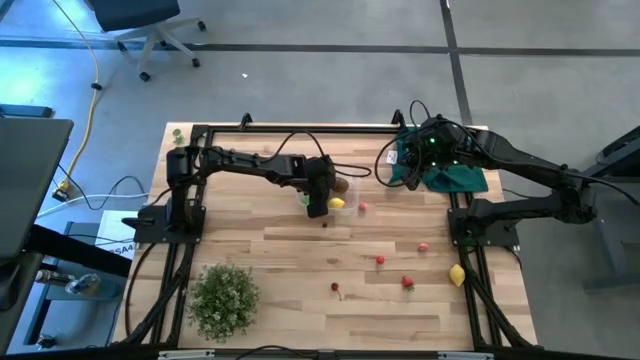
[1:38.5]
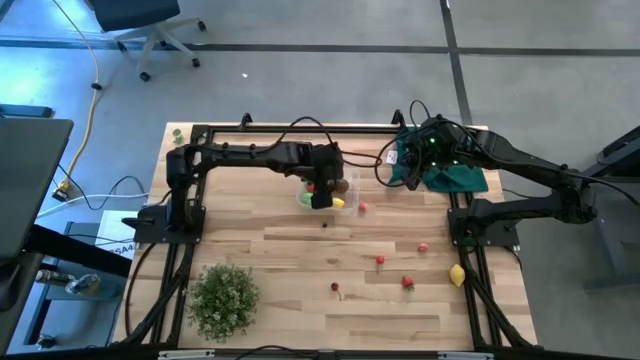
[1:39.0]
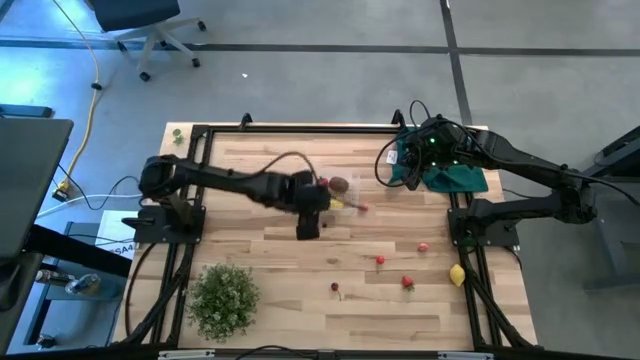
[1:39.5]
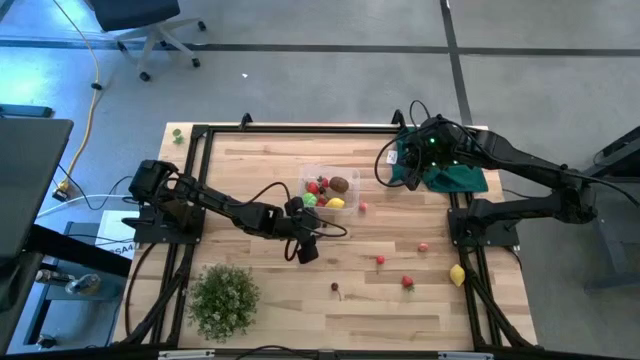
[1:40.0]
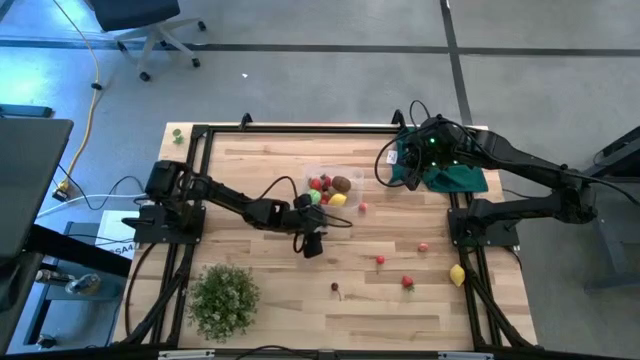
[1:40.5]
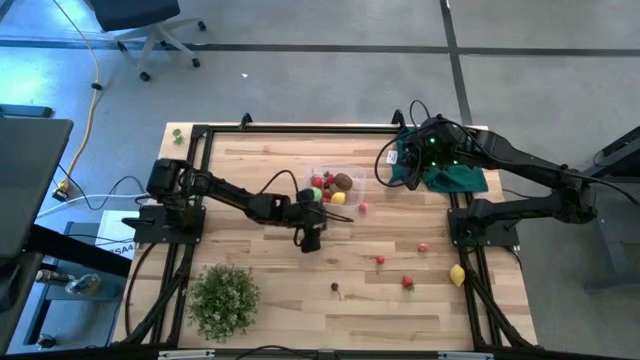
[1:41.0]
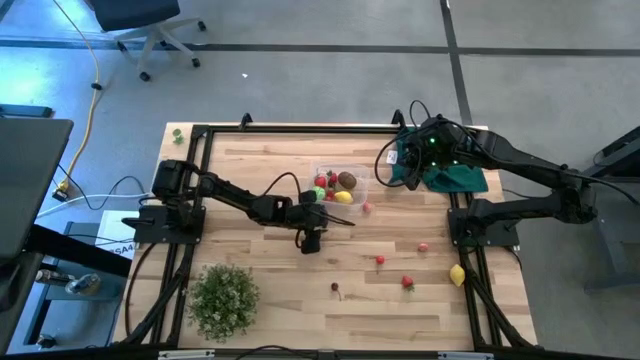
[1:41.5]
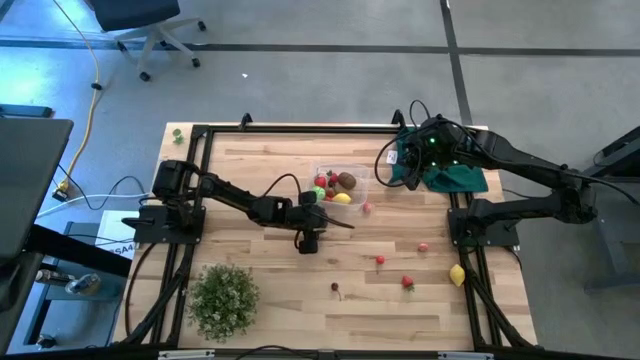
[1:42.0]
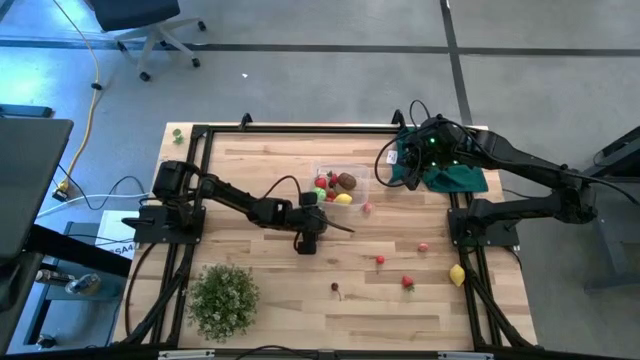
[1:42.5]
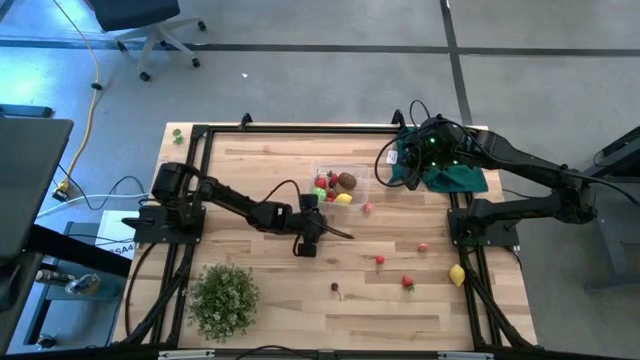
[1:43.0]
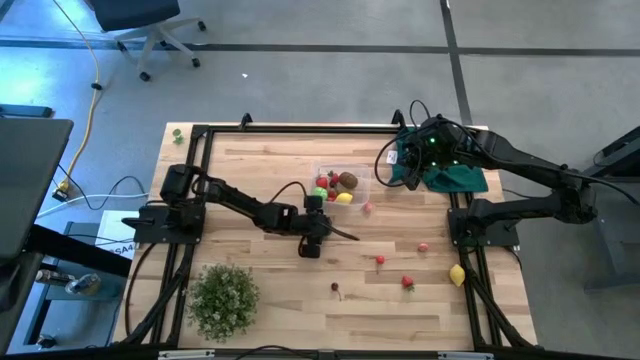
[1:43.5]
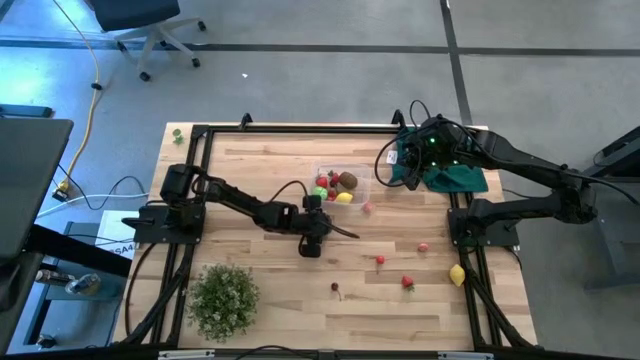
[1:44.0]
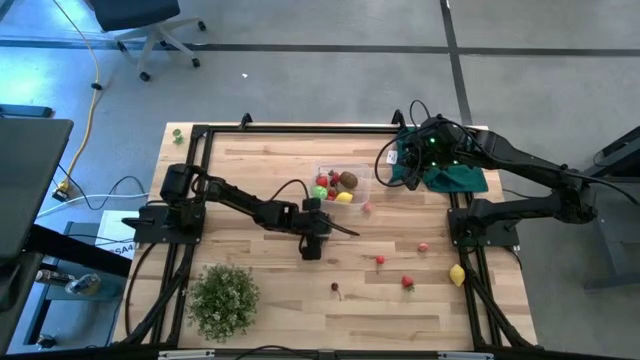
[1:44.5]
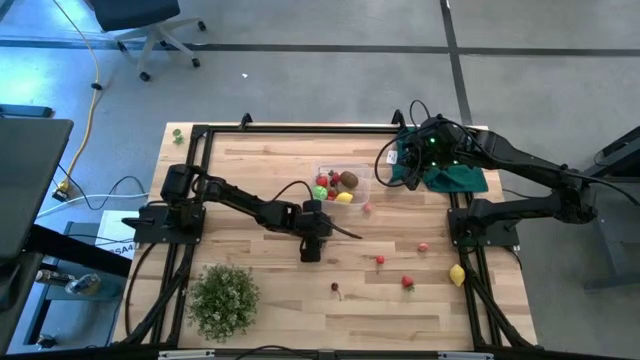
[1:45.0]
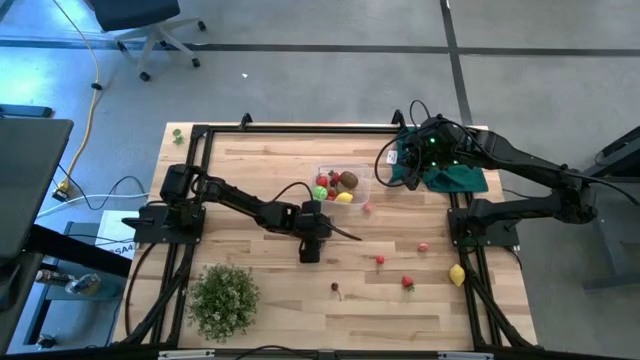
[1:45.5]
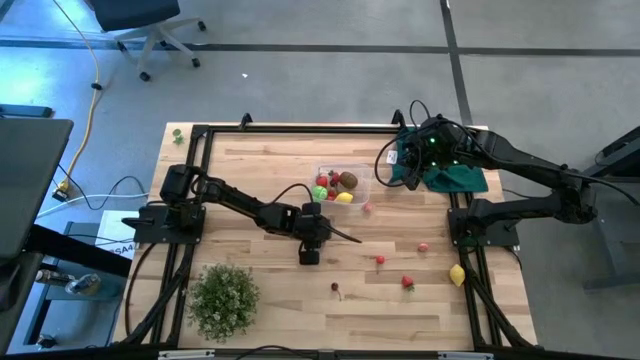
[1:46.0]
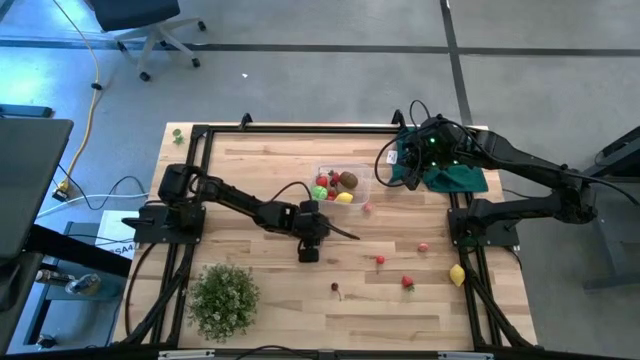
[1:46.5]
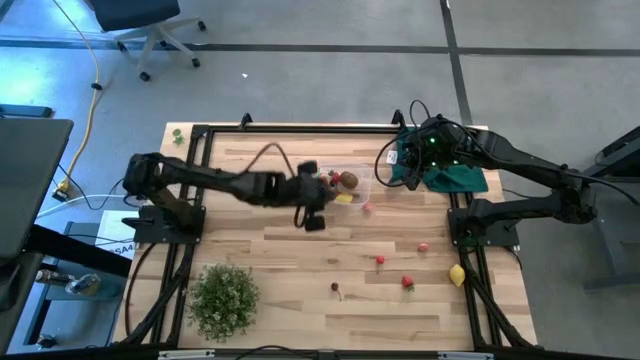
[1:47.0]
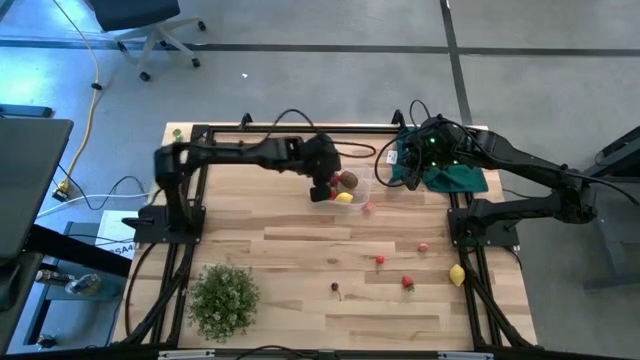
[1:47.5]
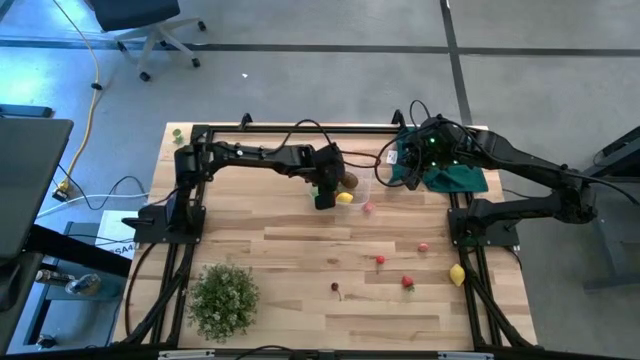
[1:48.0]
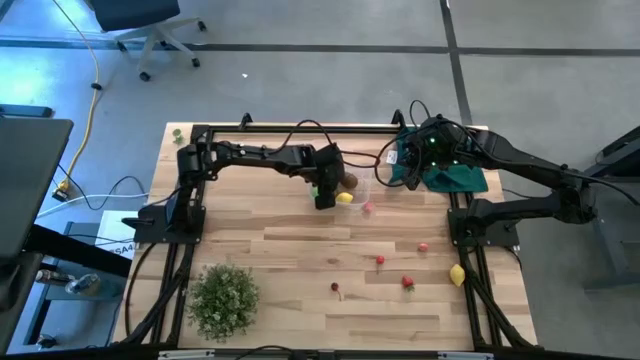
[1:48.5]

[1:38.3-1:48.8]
Task: Pick and placing Produce into tupperware
Put the blueberry into the transparent bin

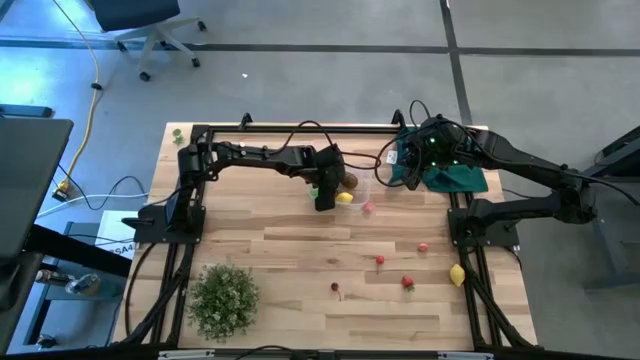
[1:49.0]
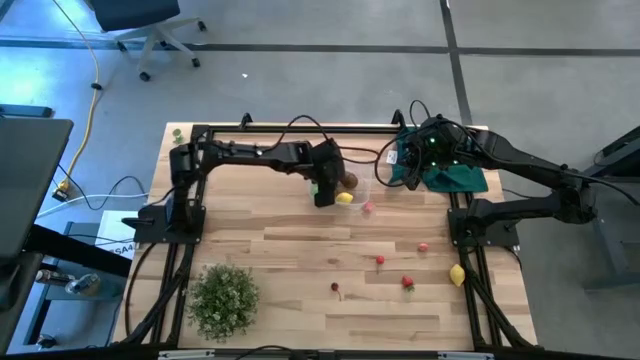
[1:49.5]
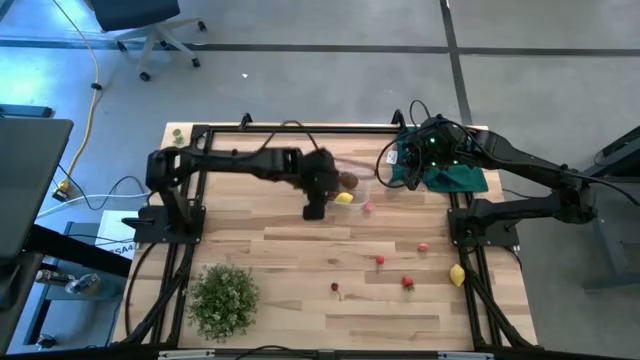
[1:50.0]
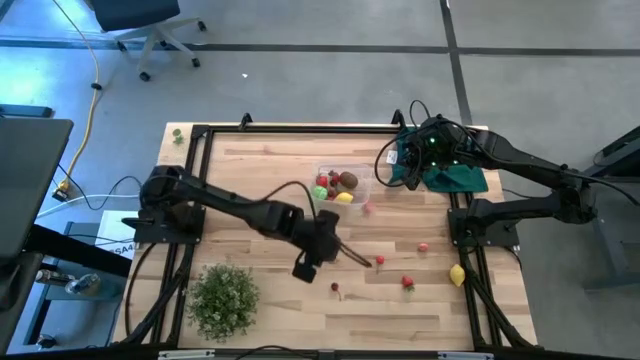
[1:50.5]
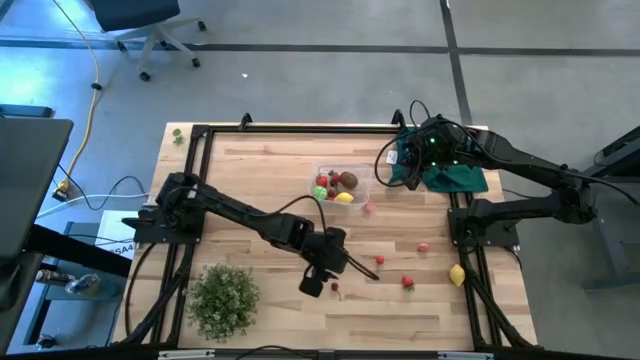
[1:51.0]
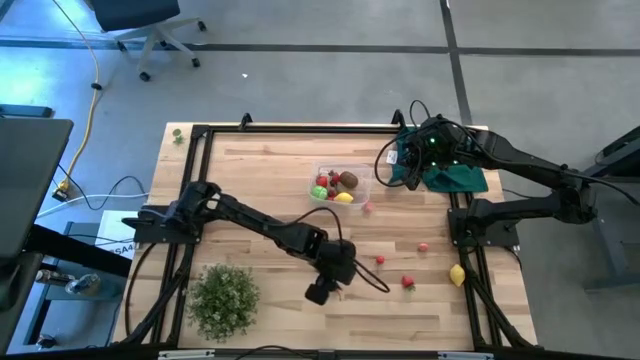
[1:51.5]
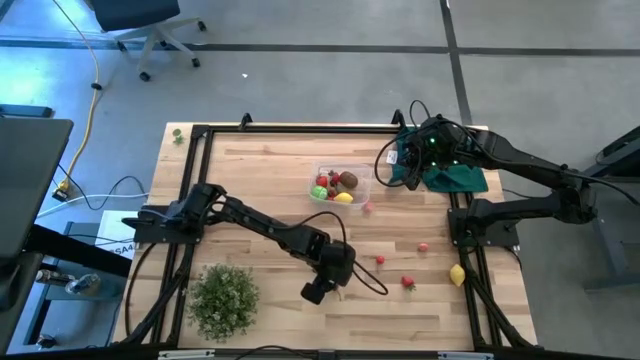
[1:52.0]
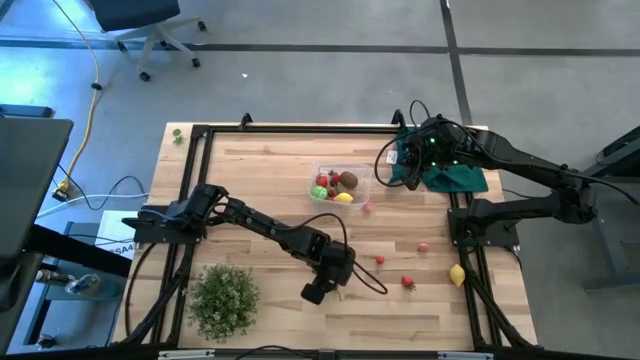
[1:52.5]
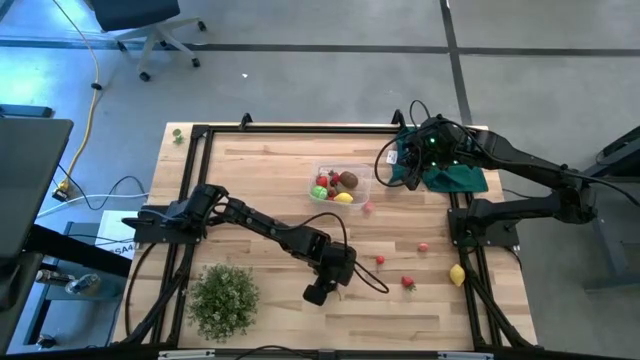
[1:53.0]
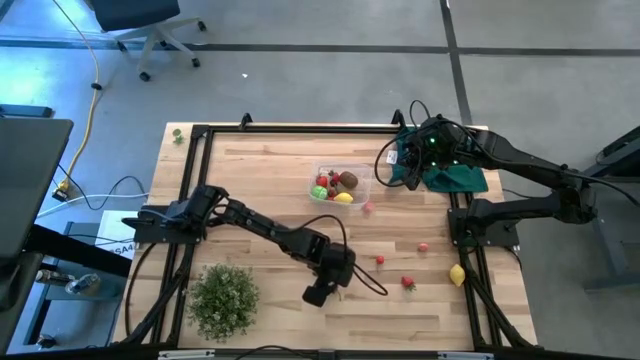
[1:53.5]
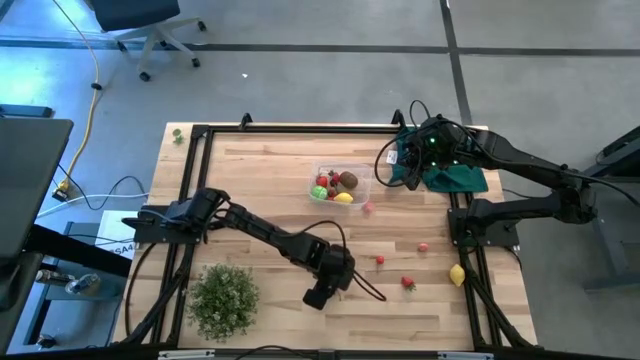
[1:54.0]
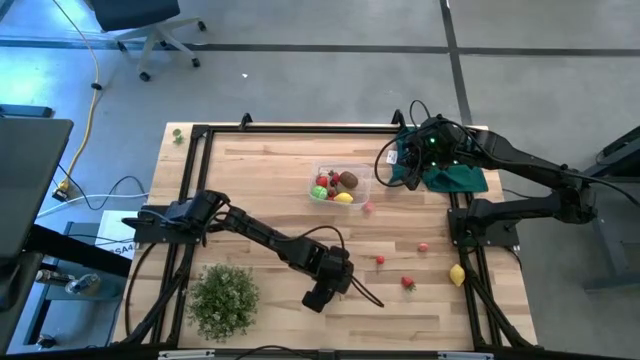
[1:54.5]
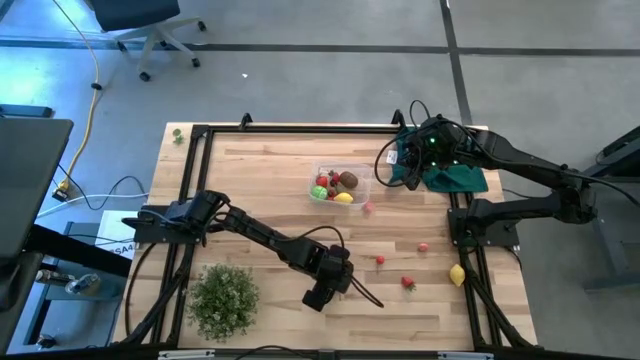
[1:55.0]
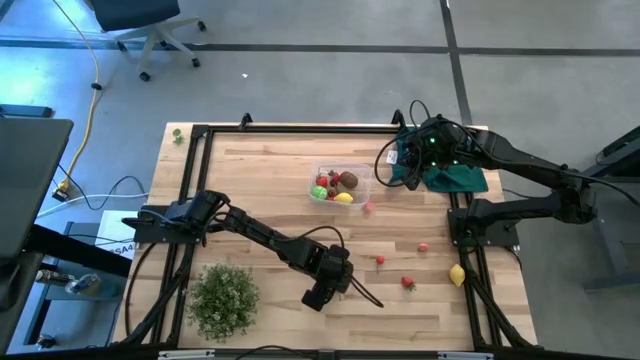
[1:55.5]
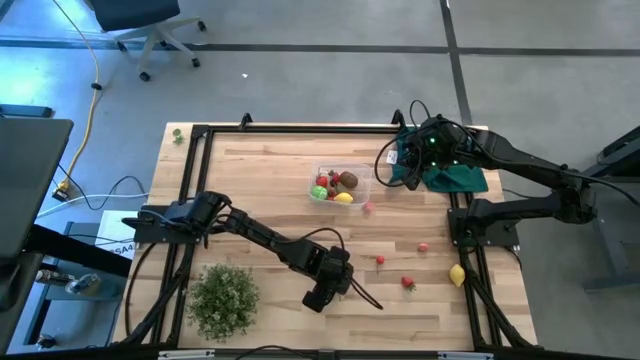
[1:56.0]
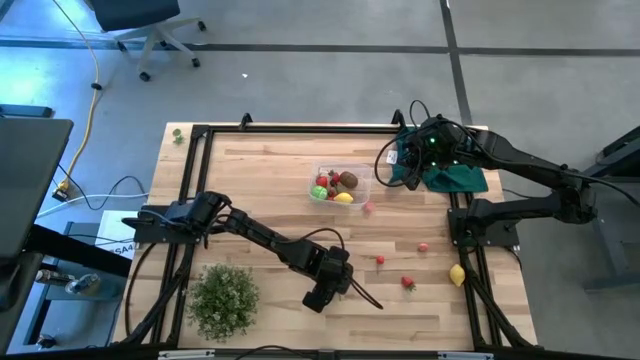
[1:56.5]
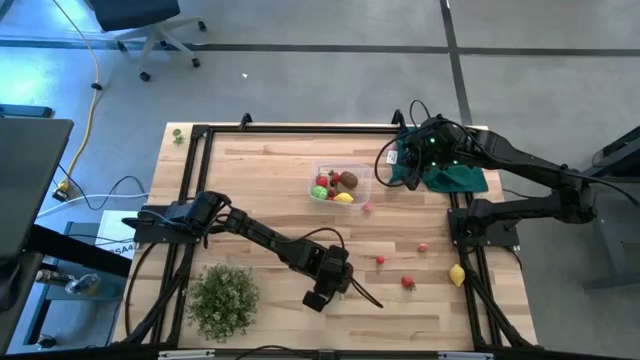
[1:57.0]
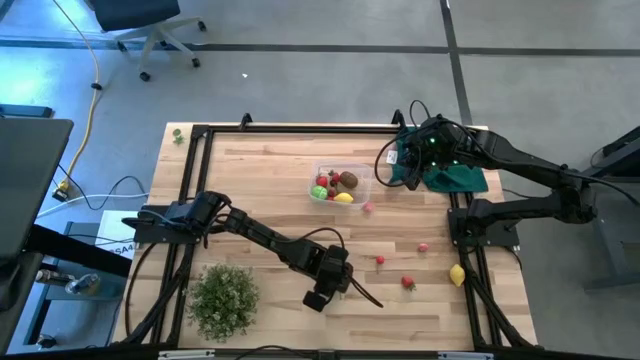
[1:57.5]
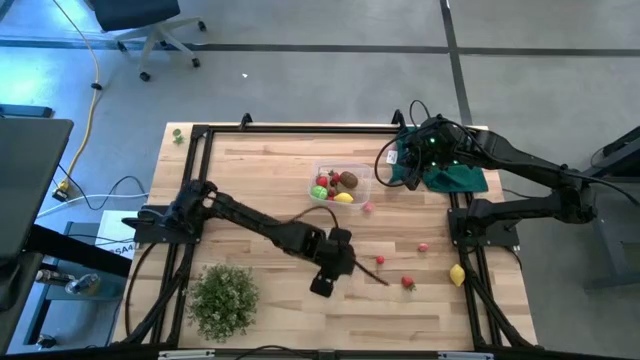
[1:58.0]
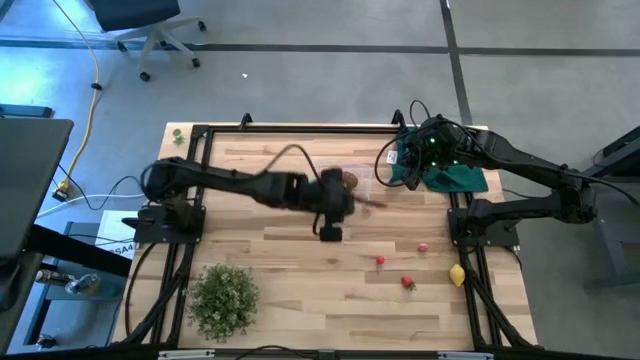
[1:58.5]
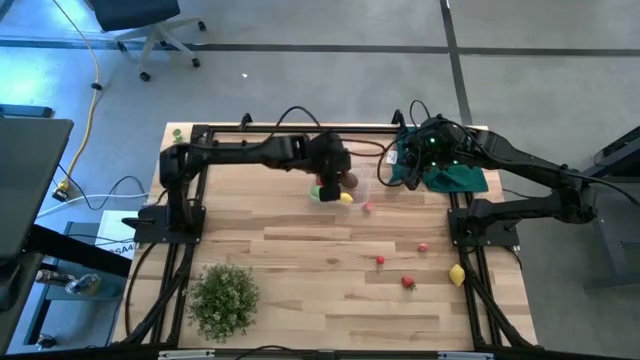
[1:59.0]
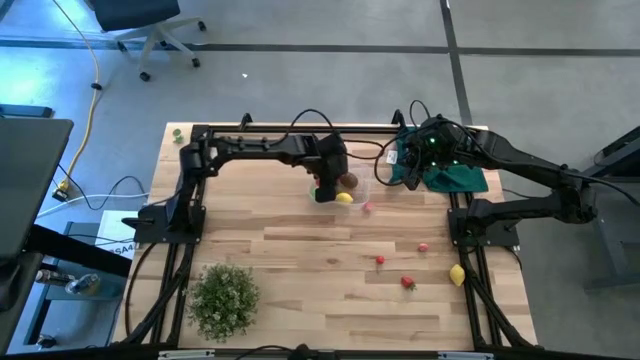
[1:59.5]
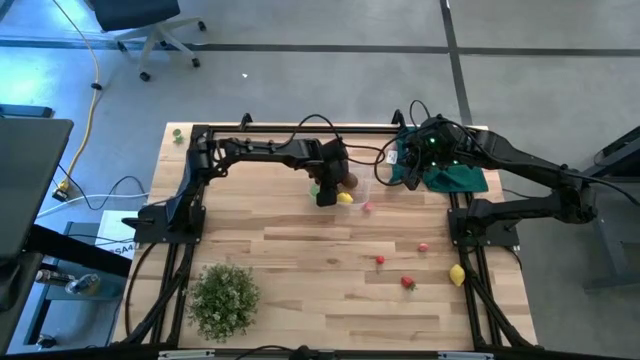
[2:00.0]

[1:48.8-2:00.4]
Put the red cherry into the transparent bin
